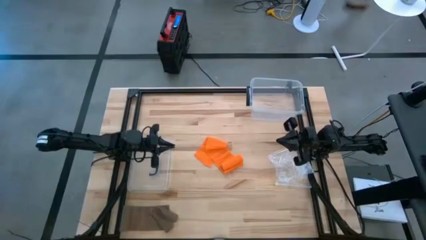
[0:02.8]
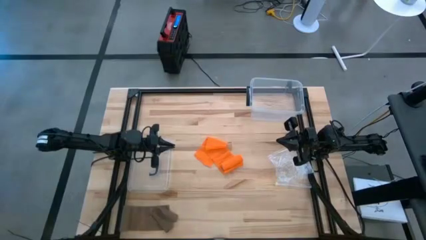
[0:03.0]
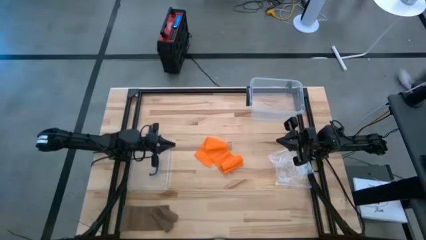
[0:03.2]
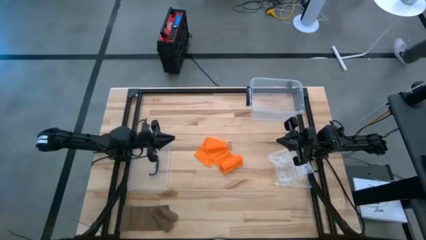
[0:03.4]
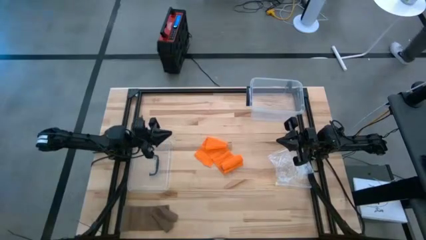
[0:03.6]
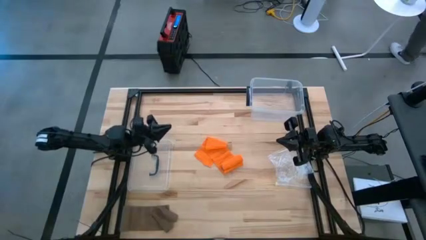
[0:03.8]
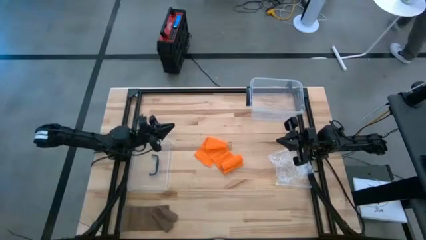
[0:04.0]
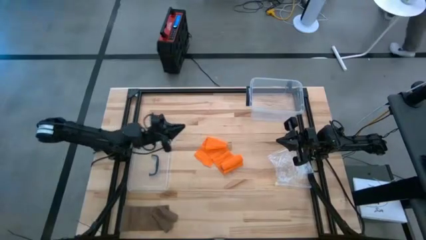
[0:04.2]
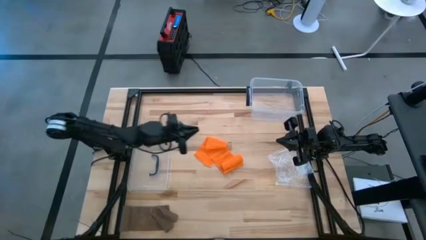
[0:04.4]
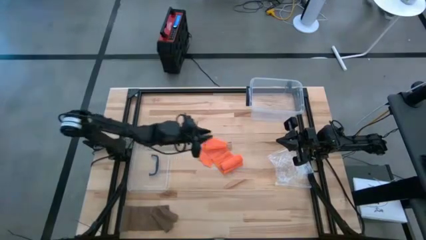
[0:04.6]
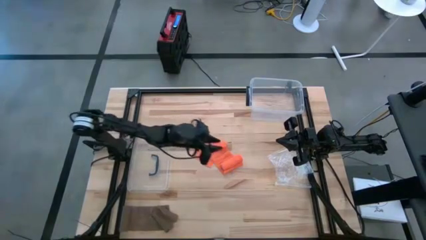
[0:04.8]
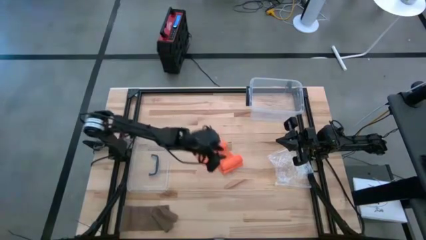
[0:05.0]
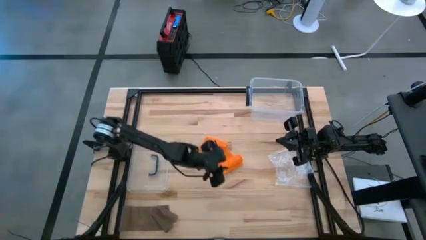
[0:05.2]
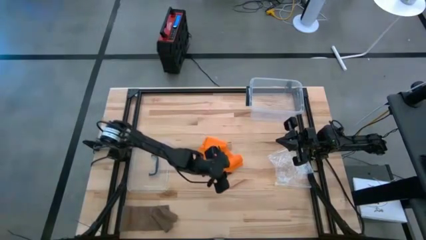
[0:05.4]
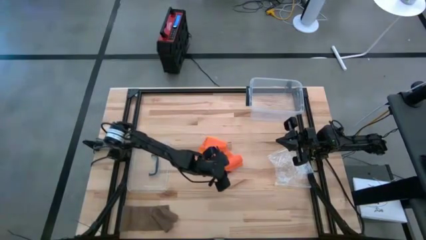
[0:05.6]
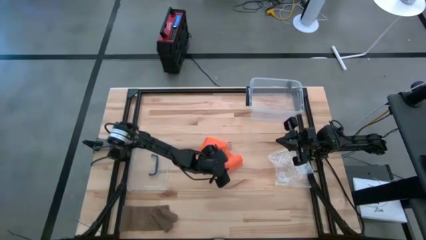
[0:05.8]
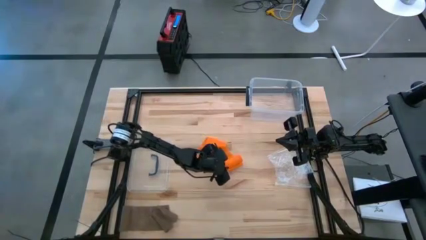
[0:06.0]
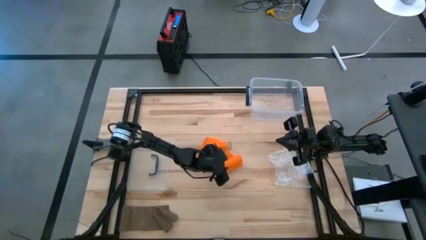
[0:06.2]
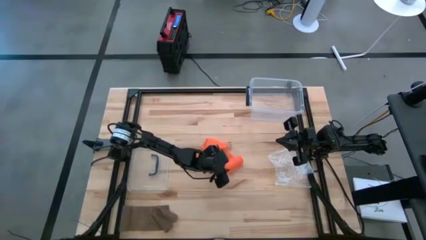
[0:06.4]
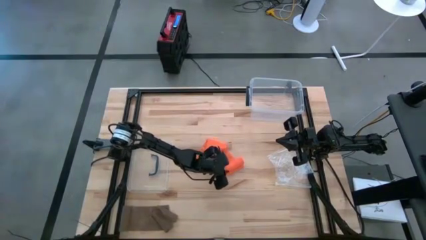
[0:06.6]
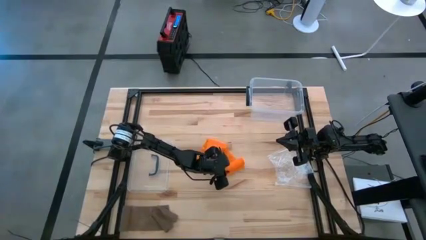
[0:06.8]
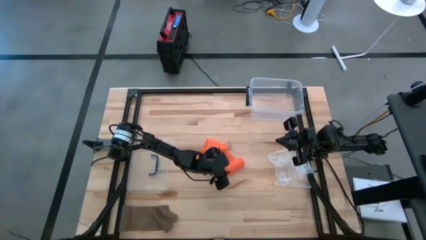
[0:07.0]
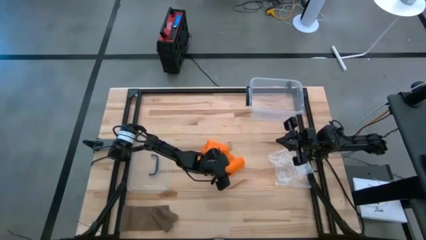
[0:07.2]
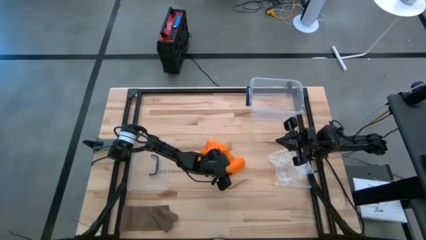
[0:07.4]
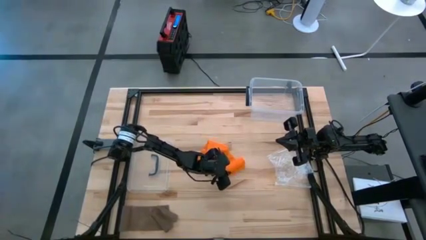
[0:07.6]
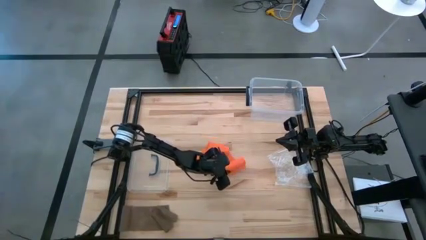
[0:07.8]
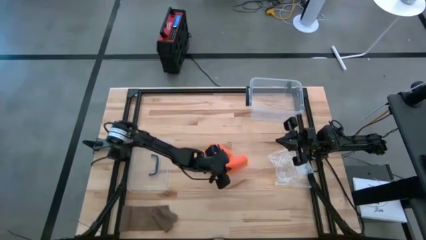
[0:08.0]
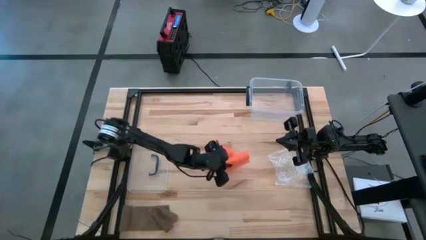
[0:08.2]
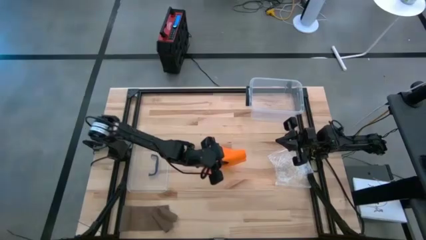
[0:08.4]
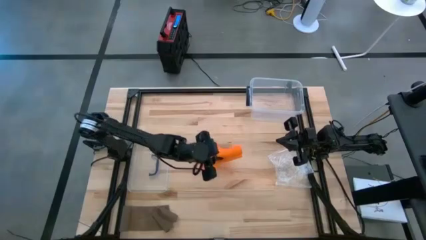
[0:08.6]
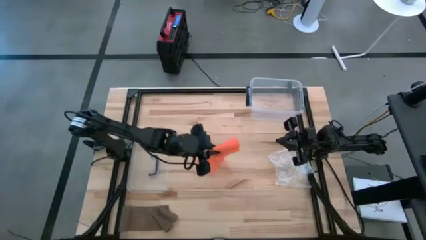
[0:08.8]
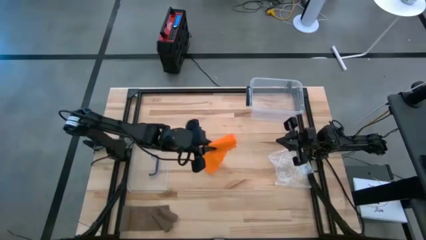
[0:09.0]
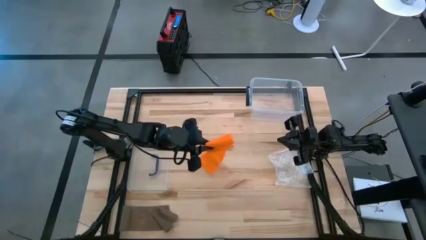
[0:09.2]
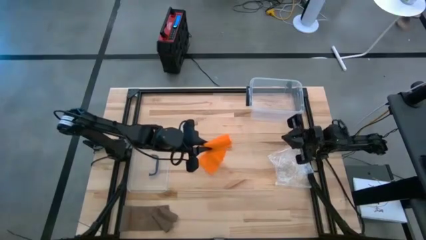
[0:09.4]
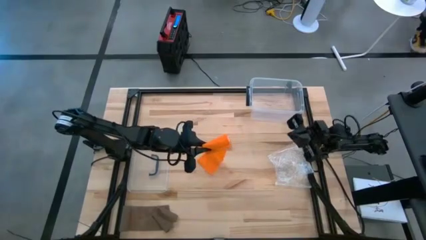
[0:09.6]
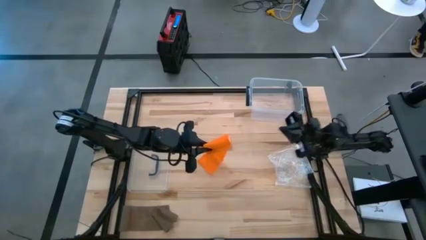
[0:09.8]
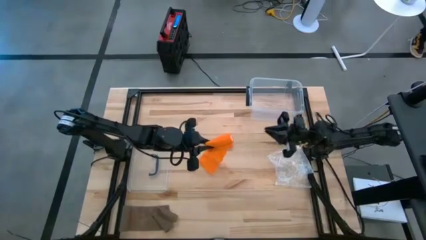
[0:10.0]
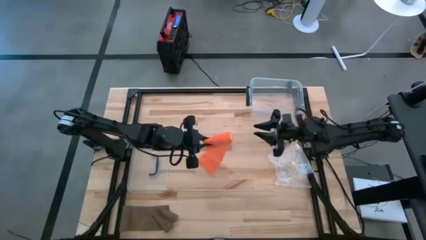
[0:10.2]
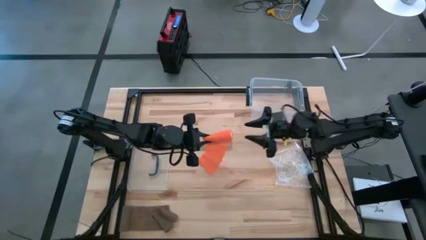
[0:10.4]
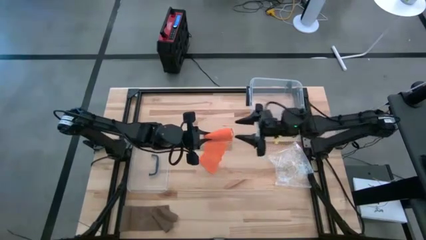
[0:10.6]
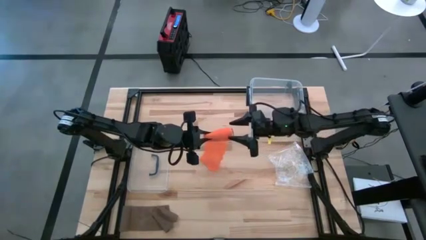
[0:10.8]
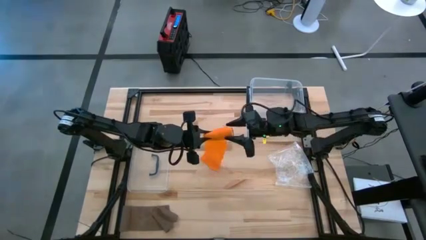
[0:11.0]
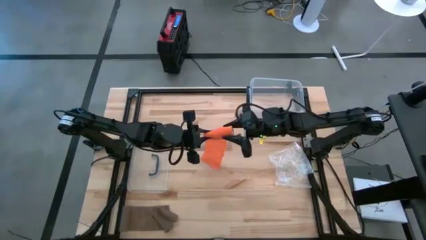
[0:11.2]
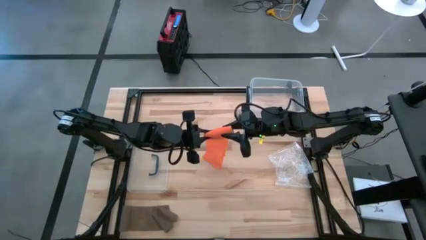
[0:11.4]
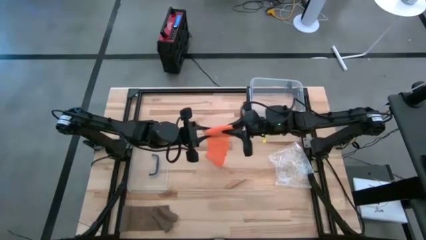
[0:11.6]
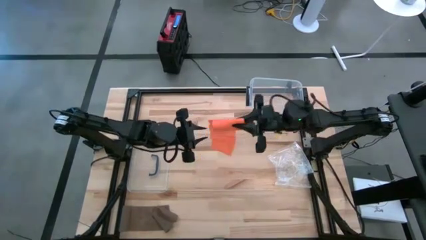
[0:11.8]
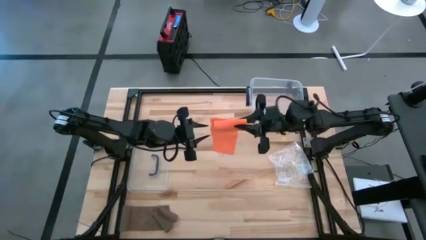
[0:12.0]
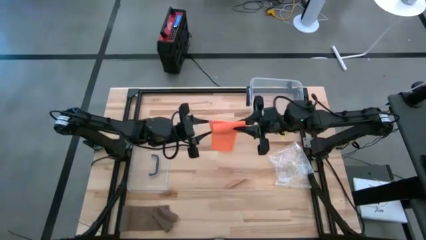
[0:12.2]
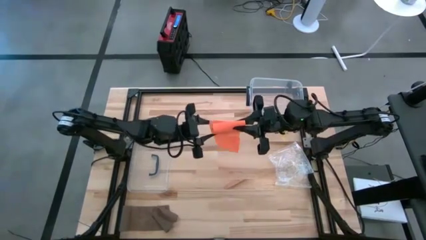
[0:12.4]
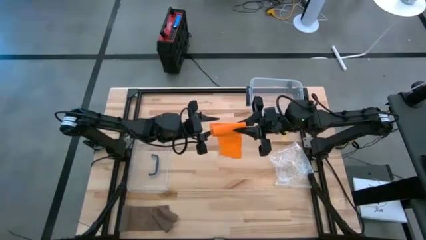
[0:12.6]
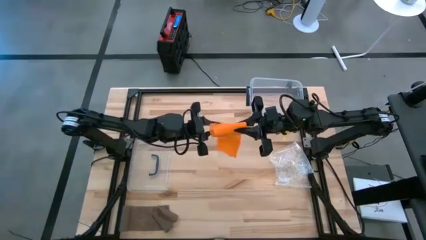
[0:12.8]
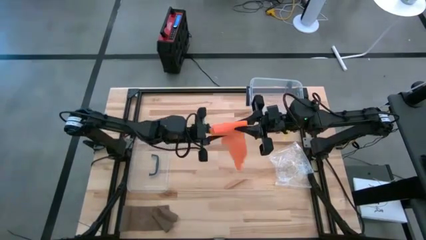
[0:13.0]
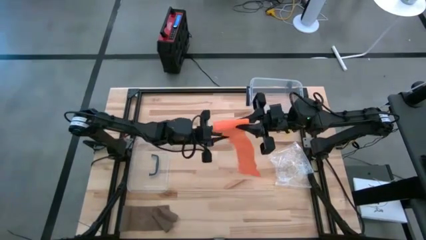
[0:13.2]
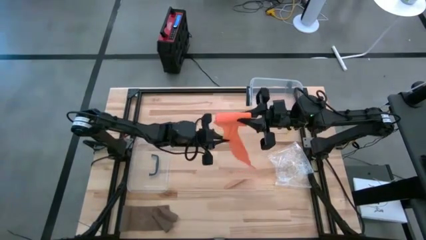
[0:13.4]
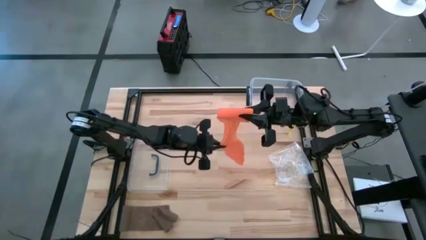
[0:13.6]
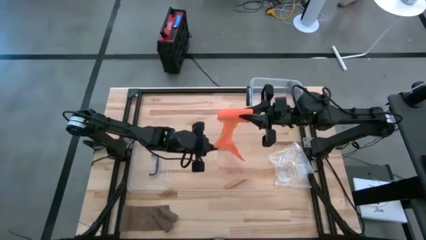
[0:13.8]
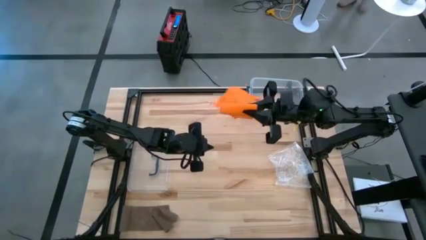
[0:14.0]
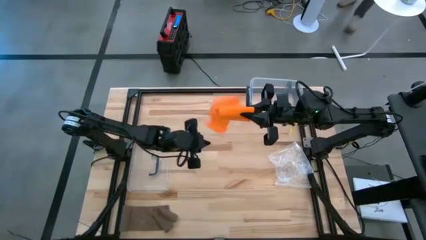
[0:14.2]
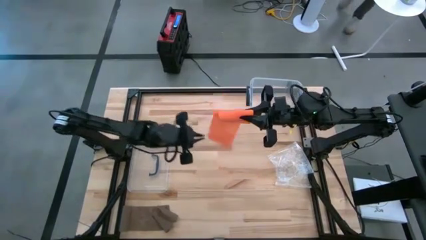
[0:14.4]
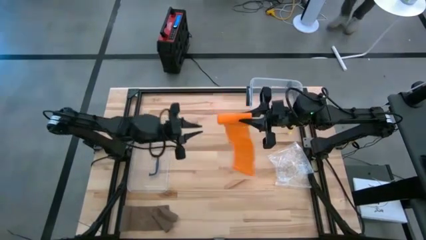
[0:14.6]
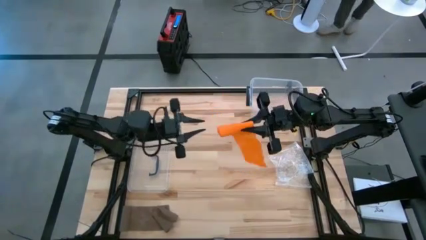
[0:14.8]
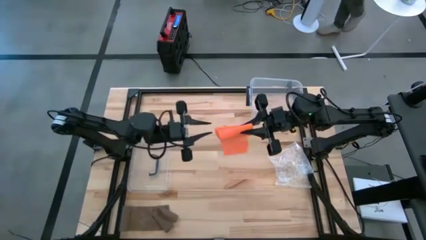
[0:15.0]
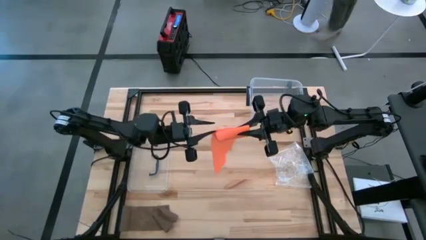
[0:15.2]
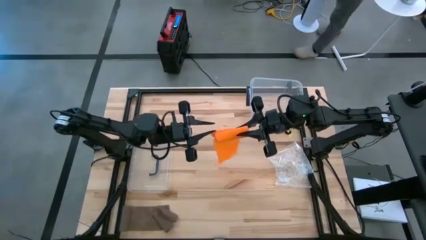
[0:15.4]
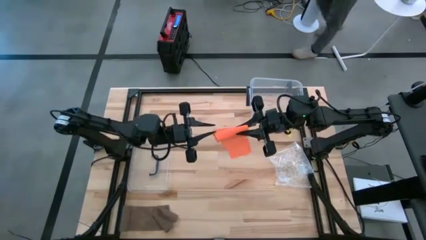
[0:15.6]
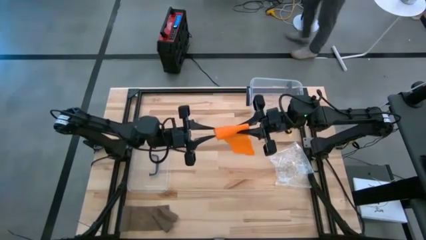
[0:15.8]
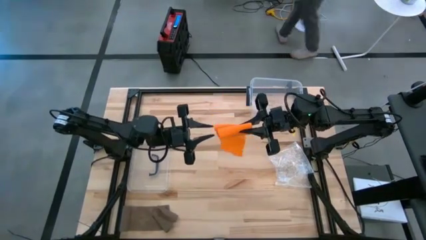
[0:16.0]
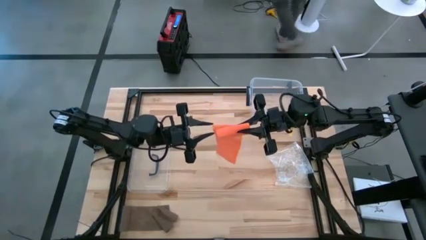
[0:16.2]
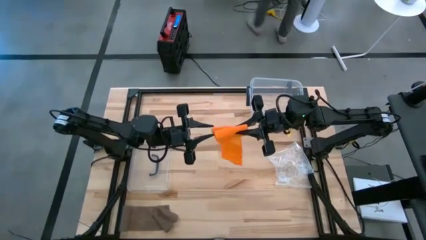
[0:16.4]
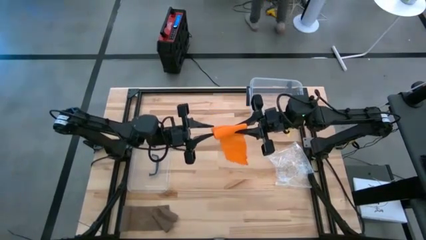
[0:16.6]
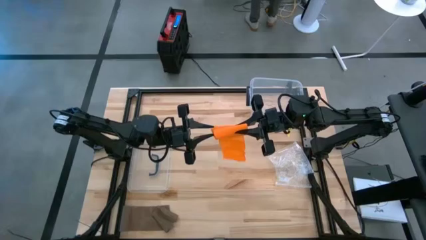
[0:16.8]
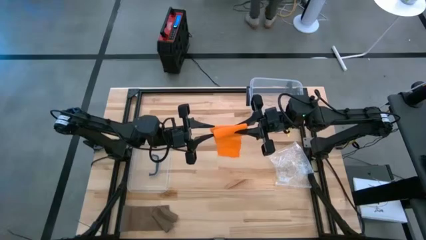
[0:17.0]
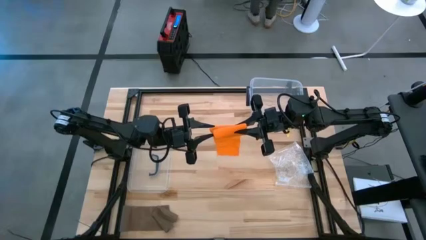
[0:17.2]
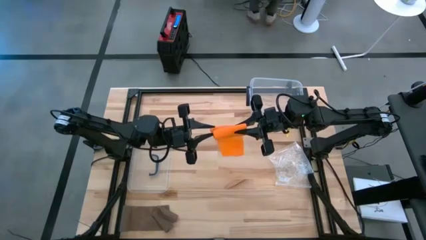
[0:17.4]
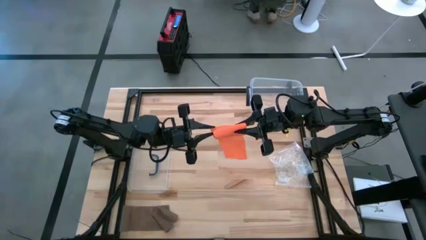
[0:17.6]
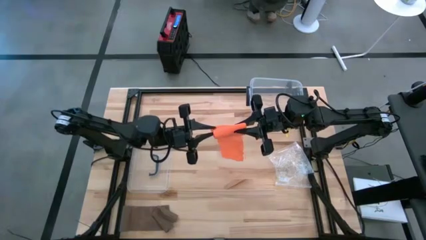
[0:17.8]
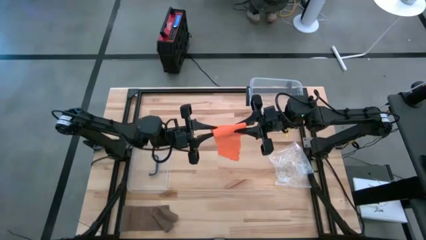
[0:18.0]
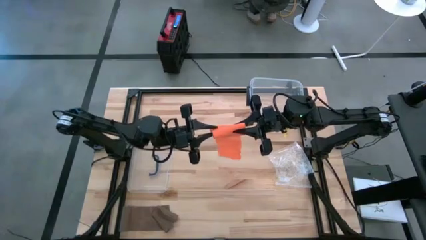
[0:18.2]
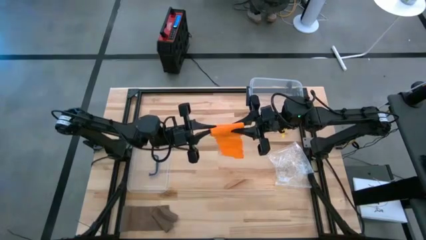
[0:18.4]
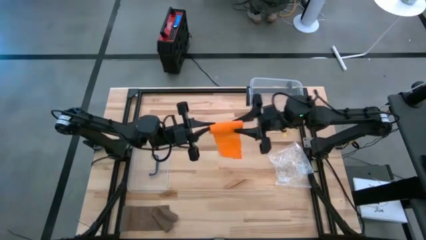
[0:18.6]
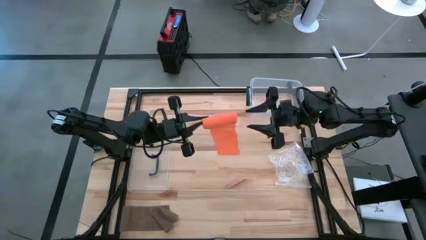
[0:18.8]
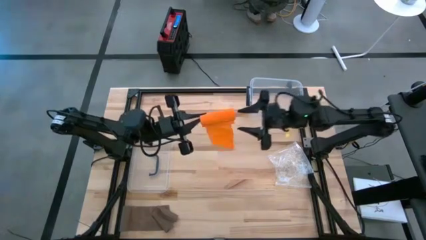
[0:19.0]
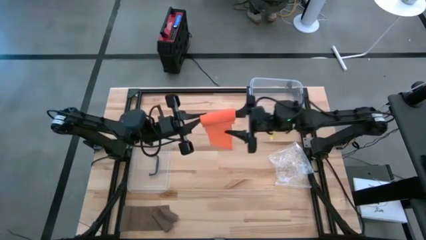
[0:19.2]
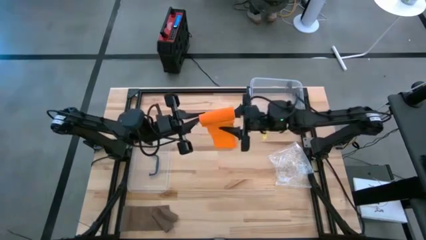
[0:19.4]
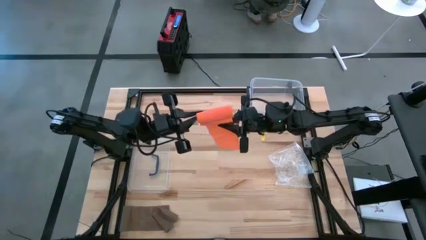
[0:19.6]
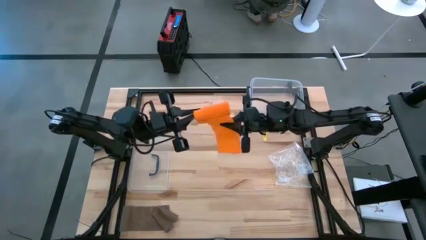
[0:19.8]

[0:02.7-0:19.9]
Task: Roll bandage
Roll the orange bandage
